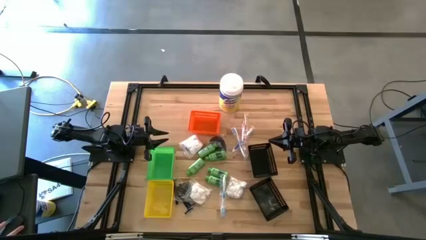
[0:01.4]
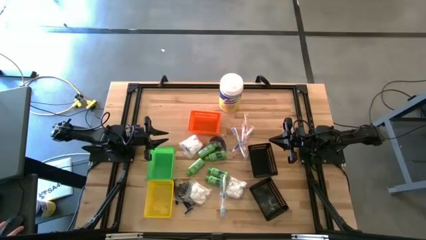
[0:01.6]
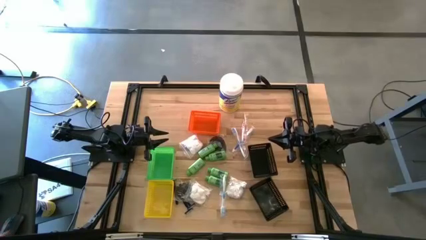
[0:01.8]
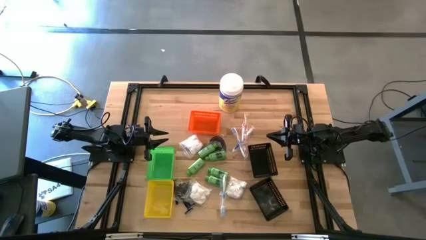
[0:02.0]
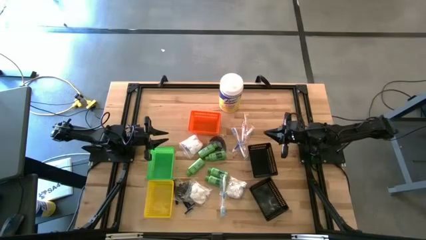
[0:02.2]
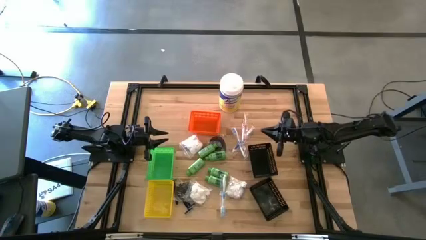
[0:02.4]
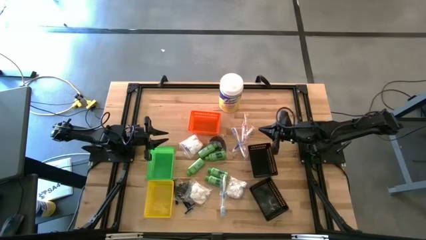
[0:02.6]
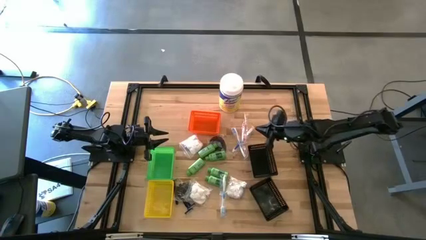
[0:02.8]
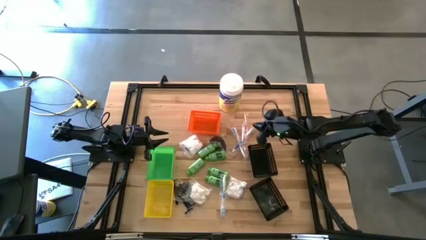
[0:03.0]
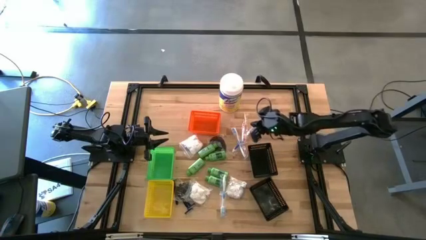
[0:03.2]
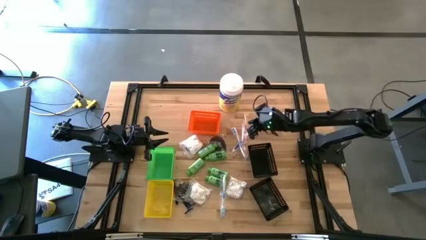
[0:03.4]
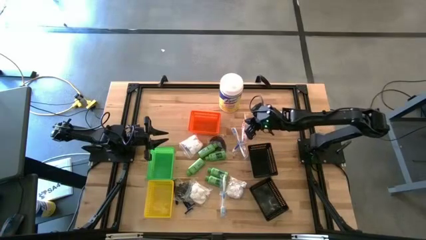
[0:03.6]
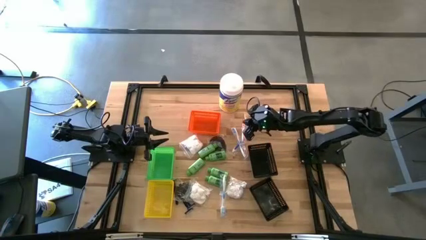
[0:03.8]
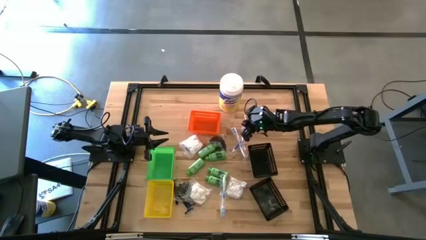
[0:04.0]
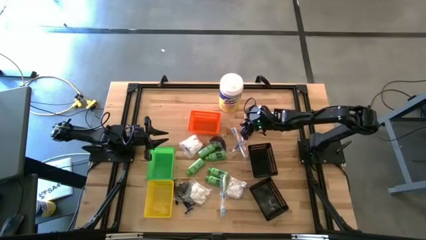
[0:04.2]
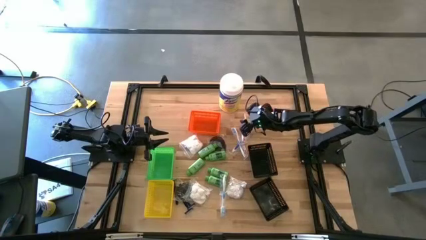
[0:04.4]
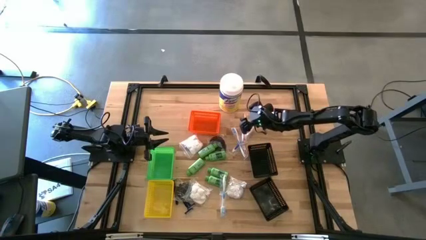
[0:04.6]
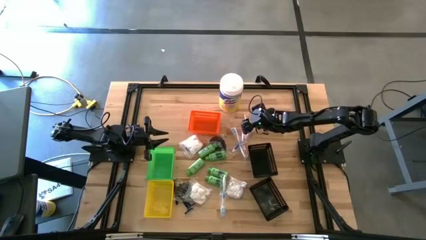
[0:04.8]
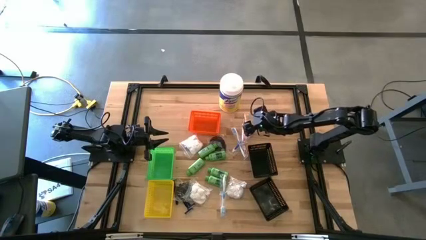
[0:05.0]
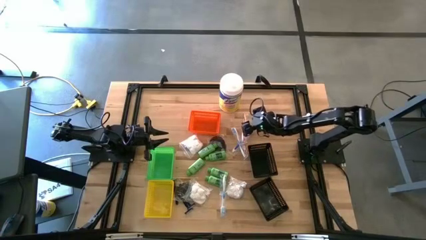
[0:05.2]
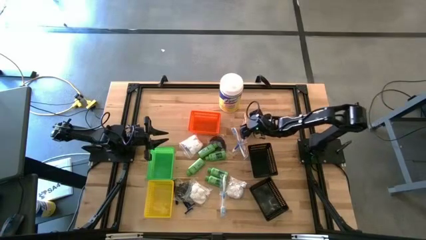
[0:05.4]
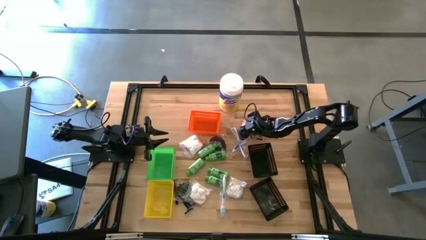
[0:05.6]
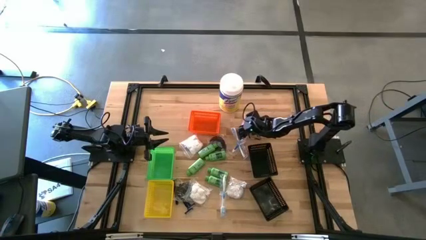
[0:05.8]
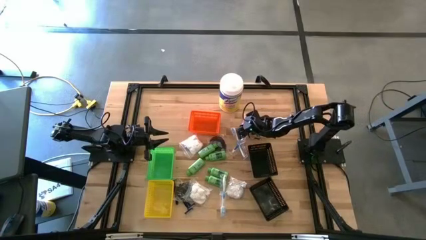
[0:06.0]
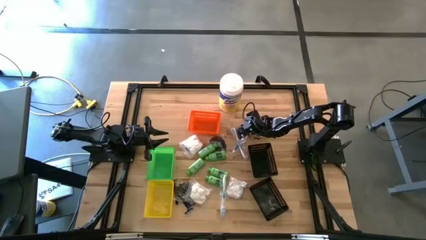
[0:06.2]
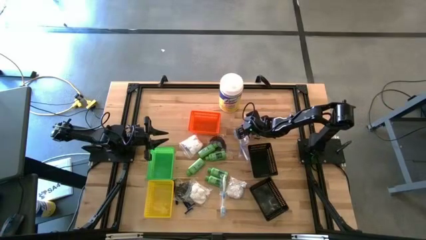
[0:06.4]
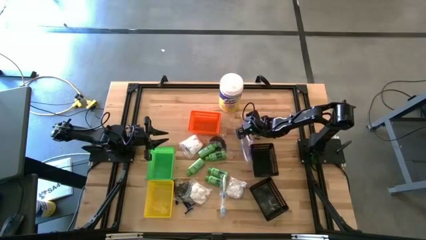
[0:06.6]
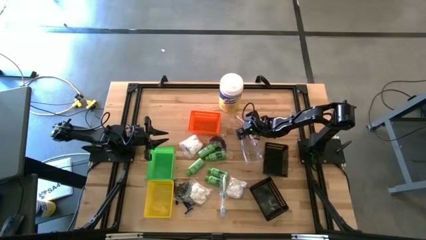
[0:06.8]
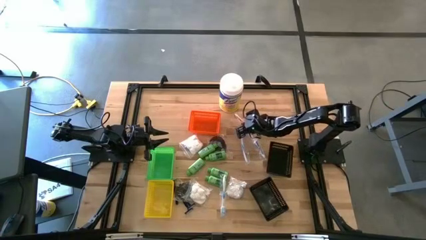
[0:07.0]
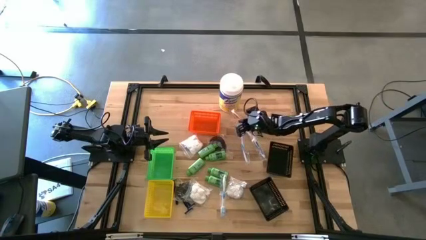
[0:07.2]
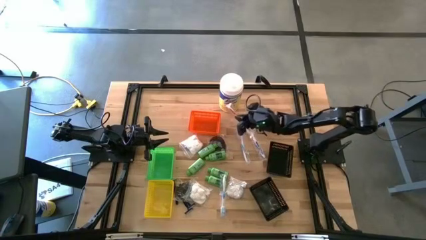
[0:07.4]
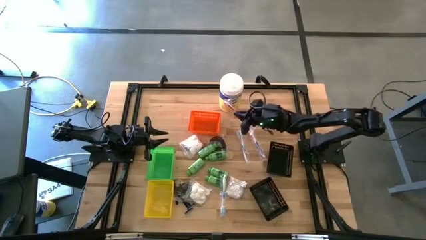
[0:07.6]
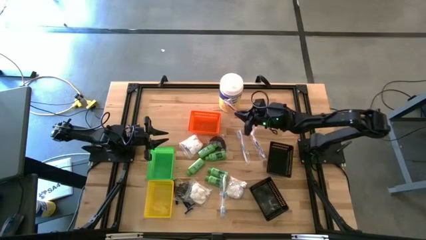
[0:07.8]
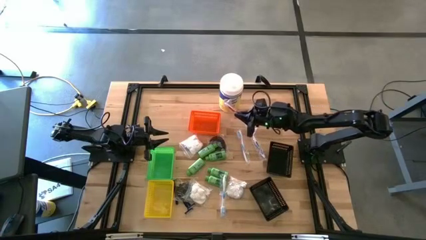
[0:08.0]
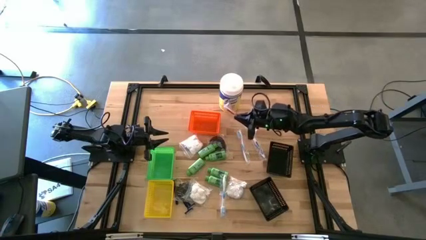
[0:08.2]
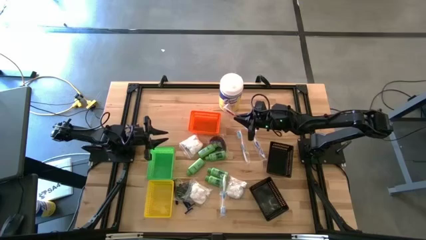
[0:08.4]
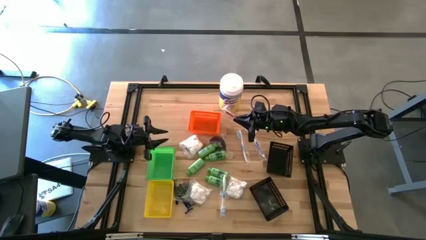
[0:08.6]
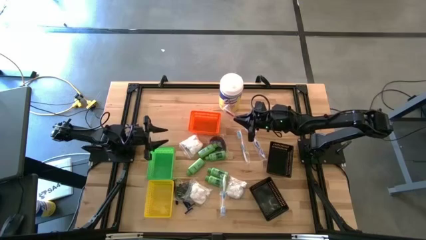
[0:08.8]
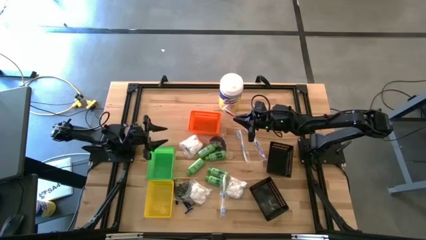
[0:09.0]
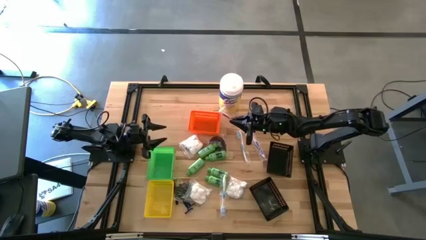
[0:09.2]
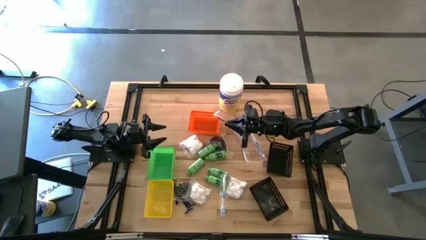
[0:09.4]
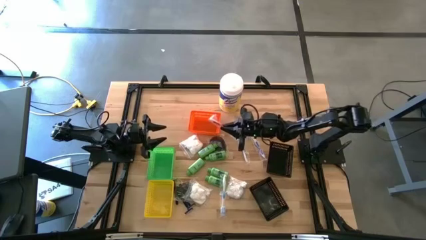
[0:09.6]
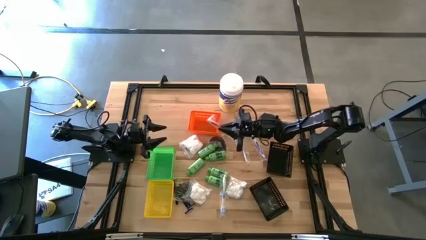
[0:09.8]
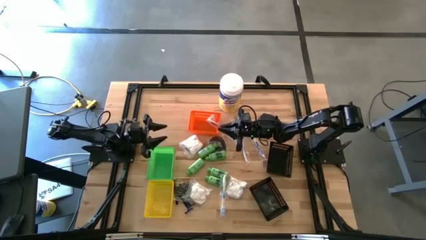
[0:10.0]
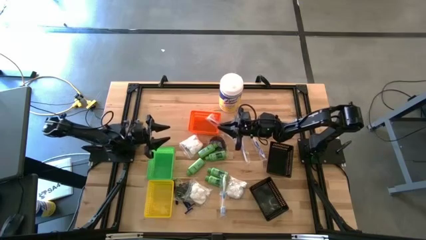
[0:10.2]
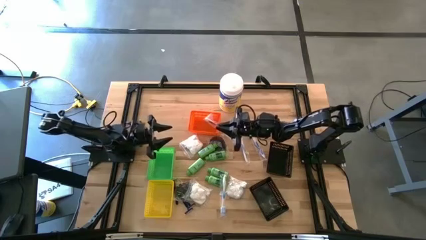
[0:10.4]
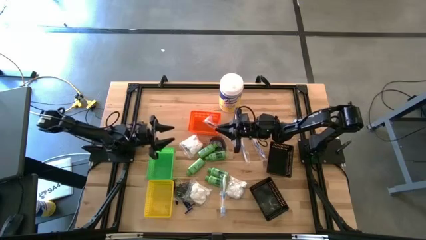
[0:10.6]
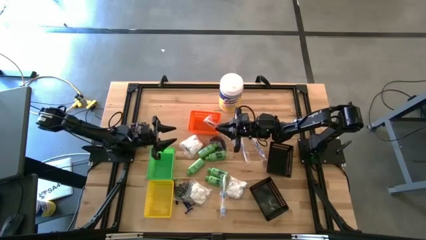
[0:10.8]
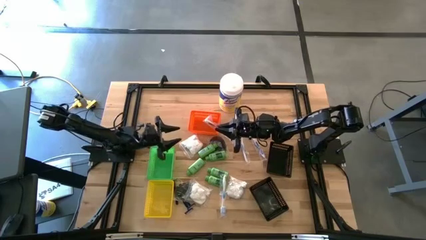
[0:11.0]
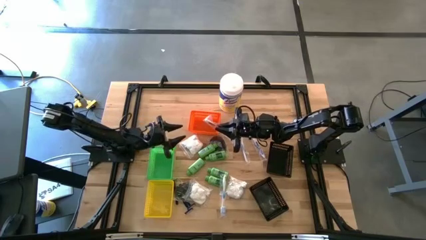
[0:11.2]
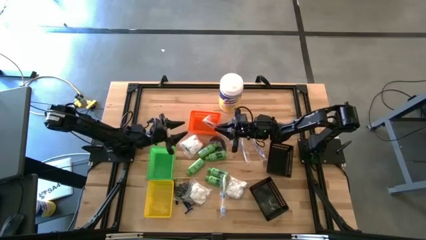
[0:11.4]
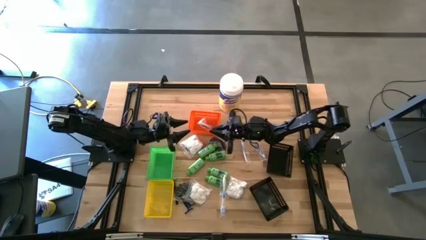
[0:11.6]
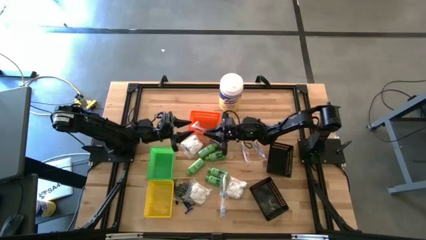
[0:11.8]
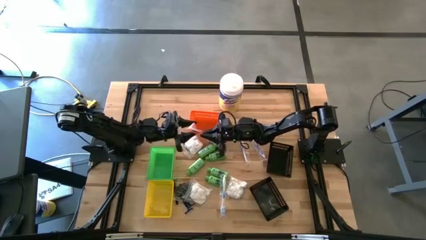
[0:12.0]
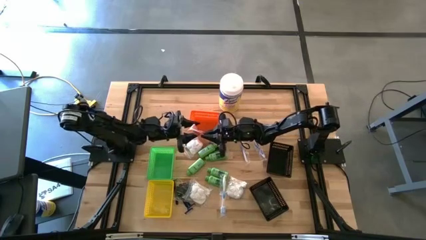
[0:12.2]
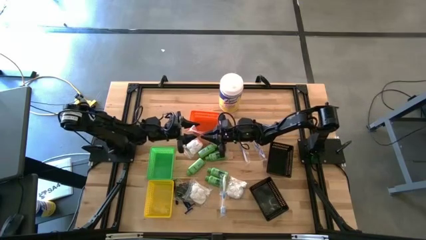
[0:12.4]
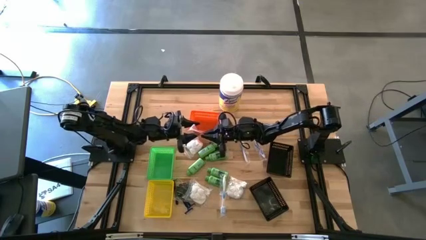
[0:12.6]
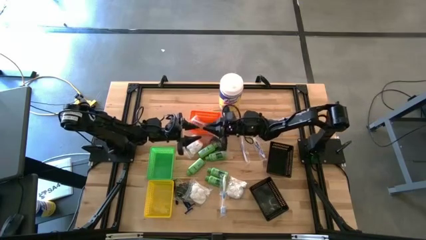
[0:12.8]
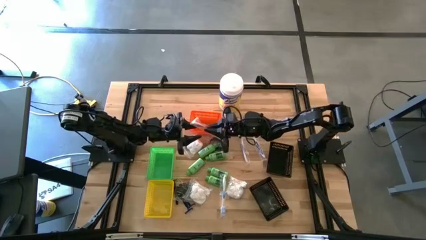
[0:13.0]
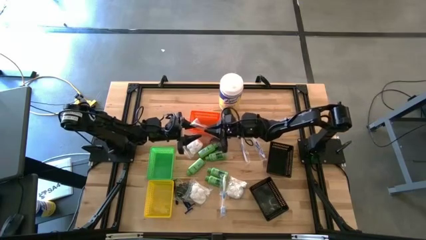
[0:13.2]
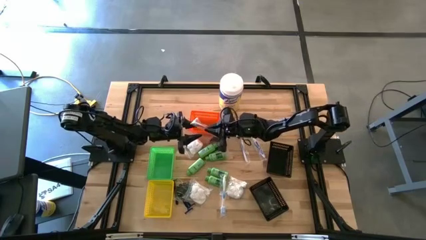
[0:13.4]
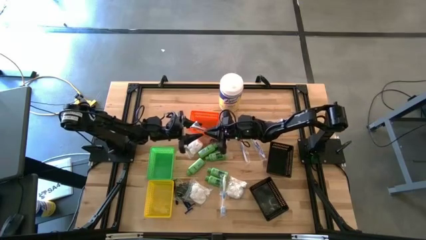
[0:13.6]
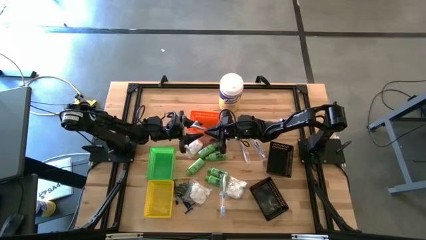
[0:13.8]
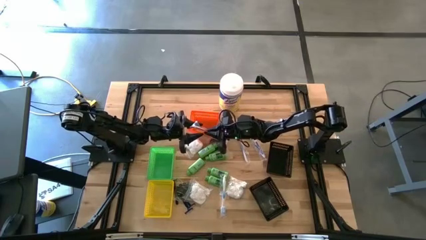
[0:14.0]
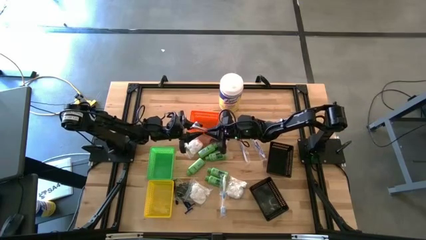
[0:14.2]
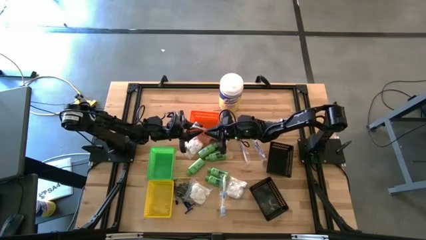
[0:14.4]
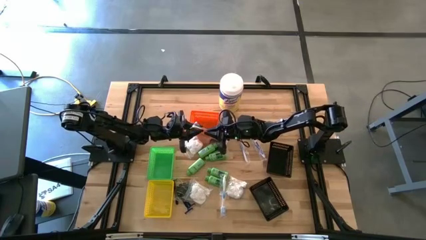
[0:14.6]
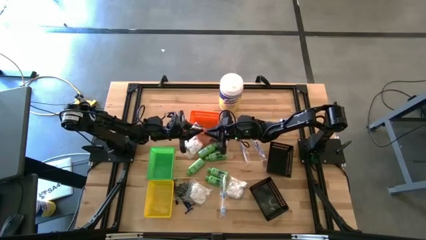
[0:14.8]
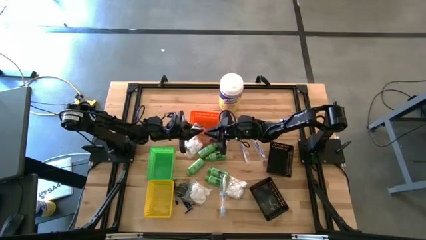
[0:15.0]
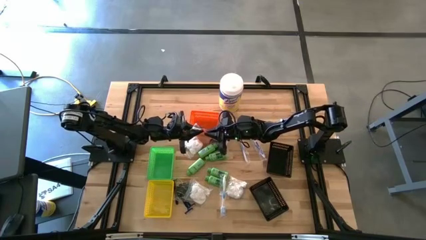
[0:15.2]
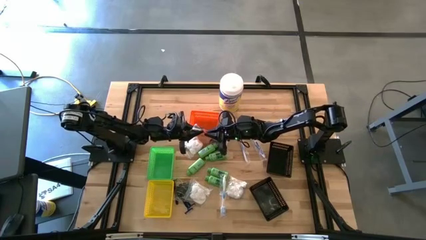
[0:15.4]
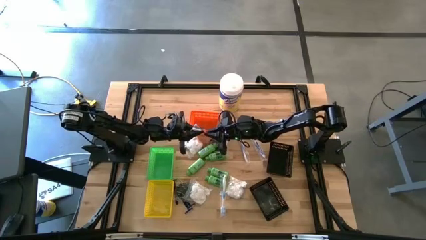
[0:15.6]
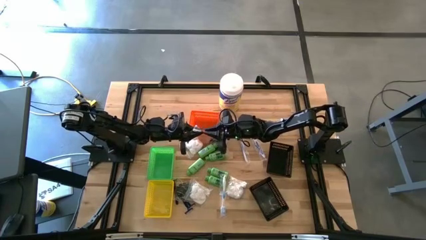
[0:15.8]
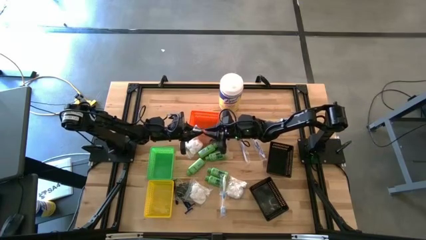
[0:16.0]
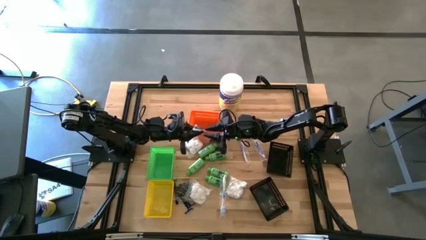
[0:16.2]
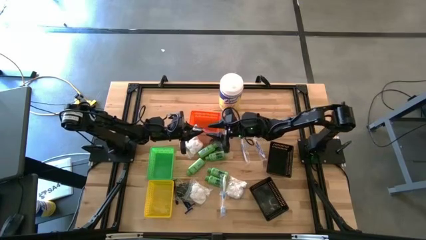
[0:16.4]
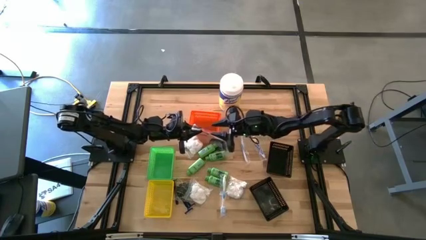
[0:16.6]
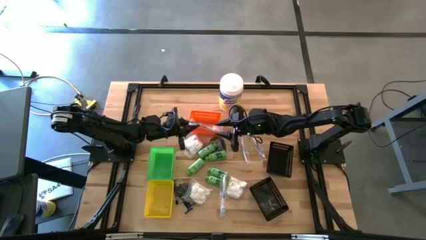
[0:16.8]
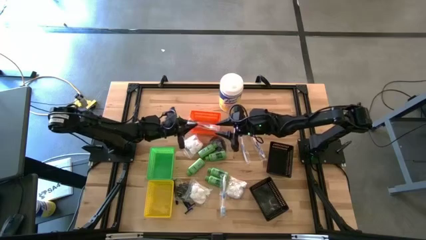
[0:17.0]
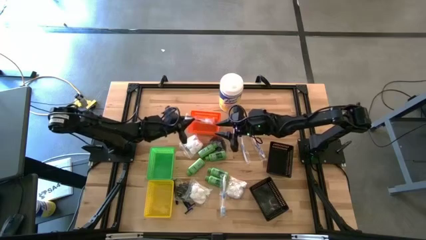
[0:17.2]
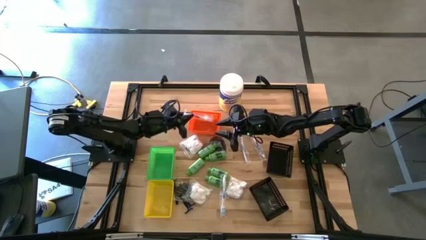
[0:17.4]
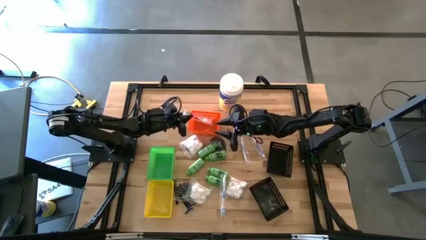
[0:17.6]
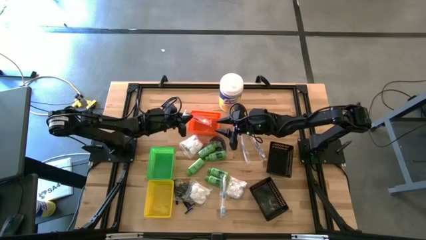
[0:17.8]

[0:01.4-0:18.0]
Task: Pick & Place Travel size toiletries
Put the red toothbrush into the orange bin
